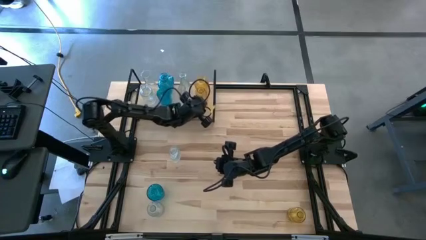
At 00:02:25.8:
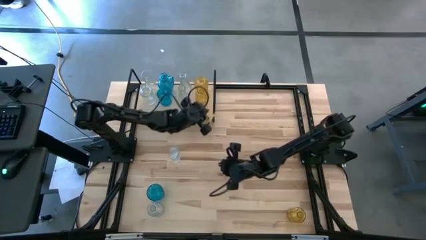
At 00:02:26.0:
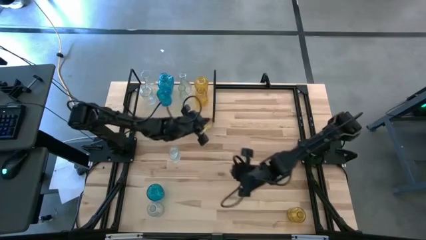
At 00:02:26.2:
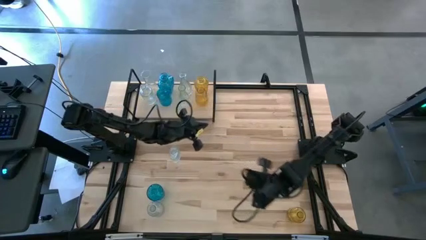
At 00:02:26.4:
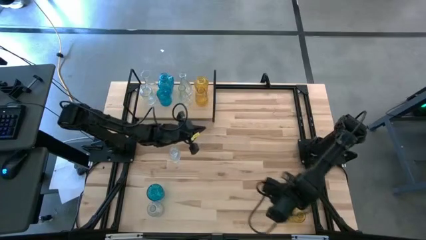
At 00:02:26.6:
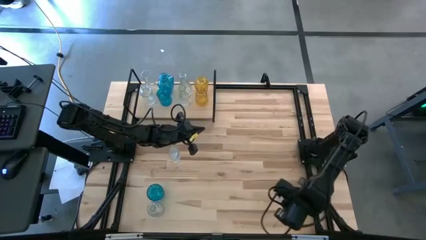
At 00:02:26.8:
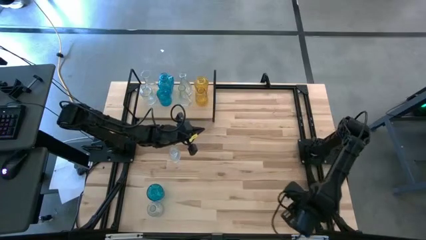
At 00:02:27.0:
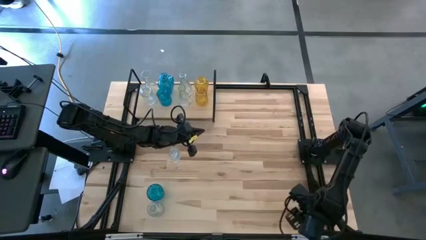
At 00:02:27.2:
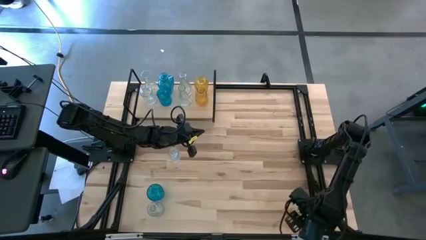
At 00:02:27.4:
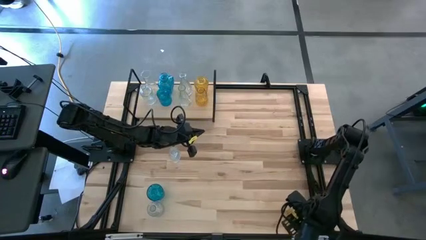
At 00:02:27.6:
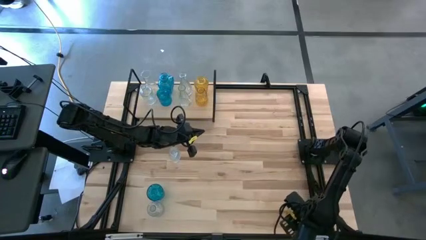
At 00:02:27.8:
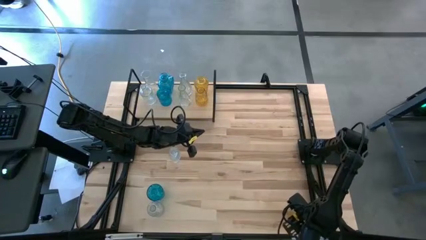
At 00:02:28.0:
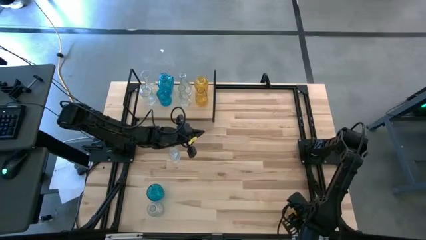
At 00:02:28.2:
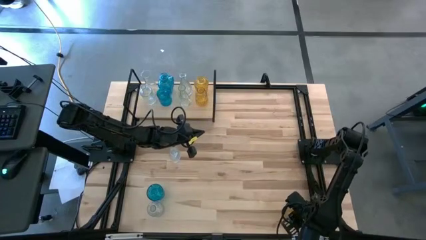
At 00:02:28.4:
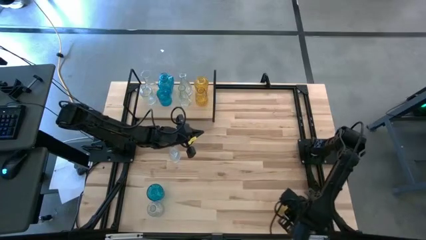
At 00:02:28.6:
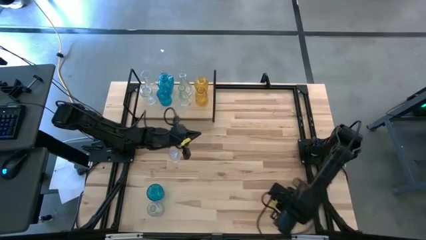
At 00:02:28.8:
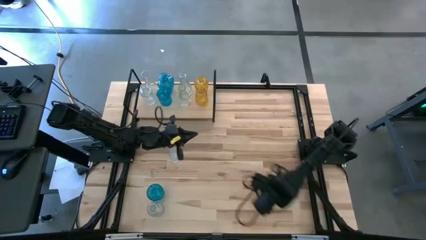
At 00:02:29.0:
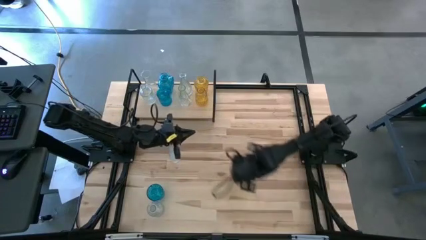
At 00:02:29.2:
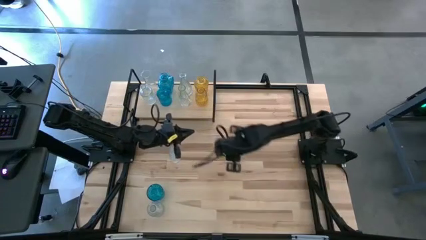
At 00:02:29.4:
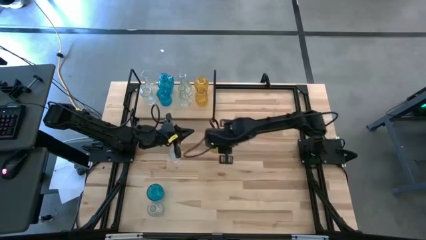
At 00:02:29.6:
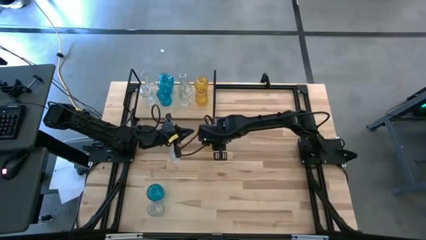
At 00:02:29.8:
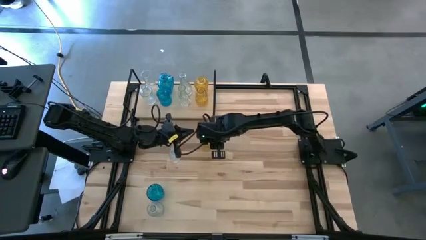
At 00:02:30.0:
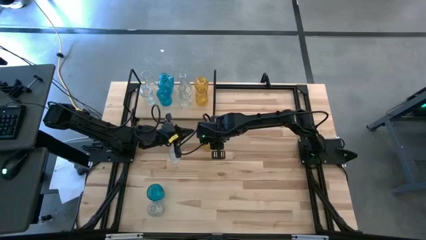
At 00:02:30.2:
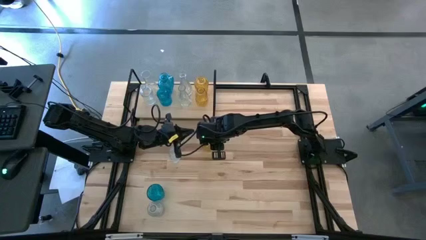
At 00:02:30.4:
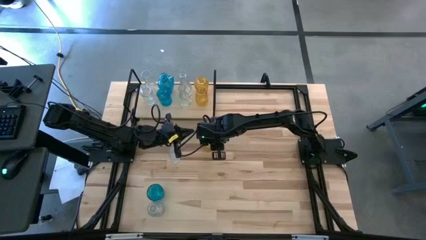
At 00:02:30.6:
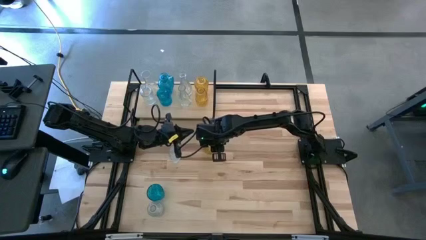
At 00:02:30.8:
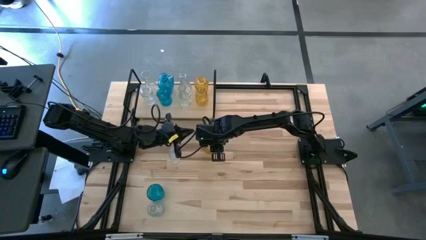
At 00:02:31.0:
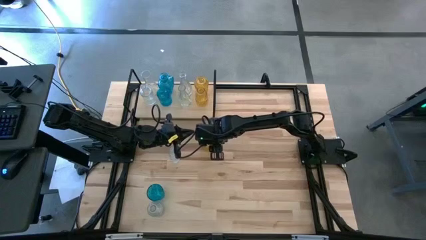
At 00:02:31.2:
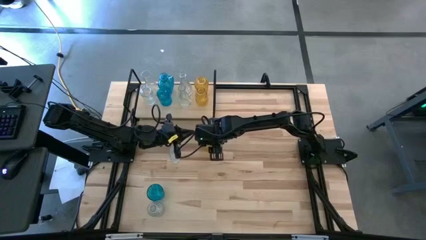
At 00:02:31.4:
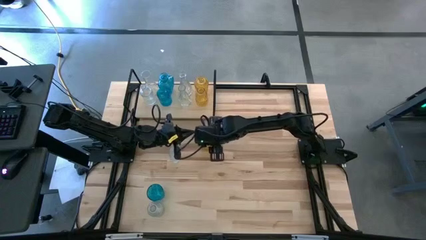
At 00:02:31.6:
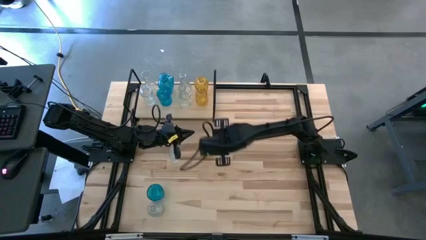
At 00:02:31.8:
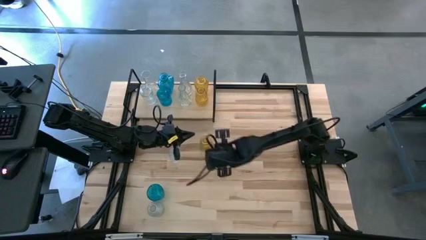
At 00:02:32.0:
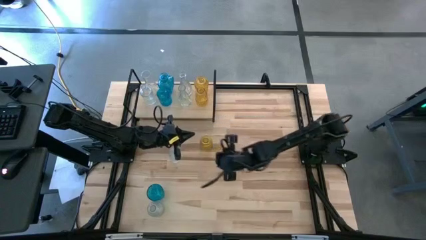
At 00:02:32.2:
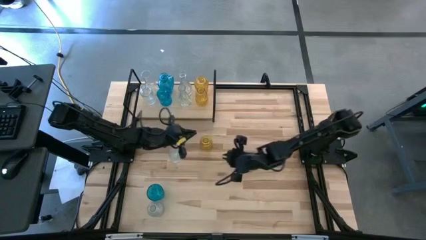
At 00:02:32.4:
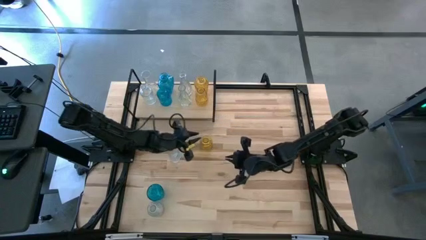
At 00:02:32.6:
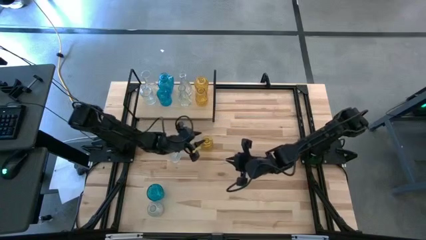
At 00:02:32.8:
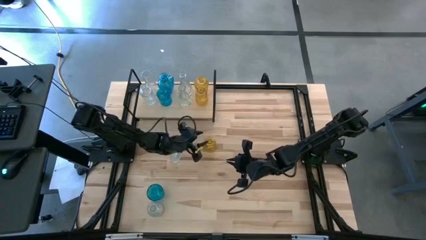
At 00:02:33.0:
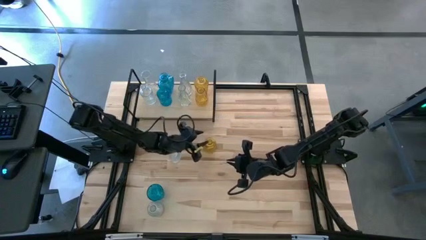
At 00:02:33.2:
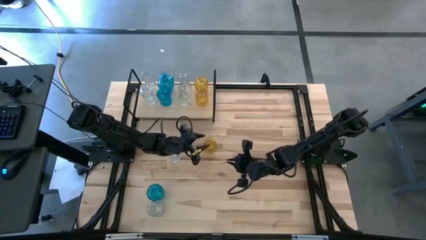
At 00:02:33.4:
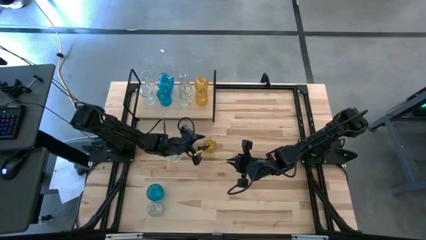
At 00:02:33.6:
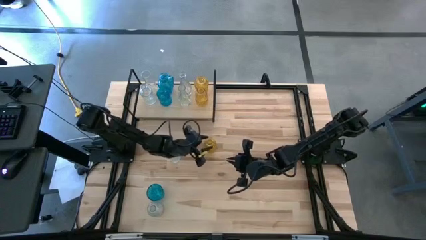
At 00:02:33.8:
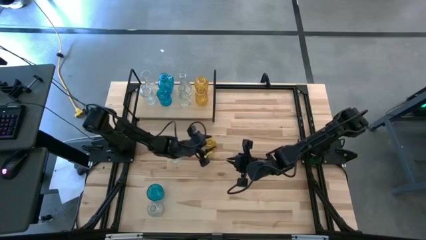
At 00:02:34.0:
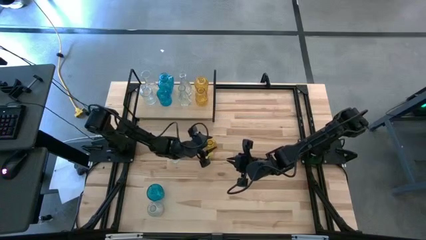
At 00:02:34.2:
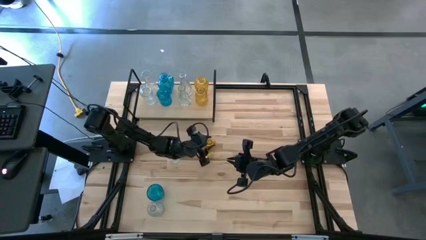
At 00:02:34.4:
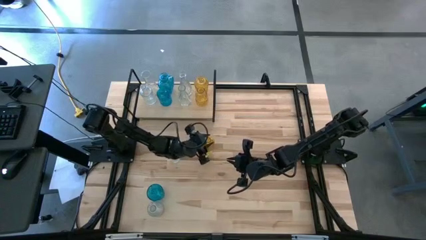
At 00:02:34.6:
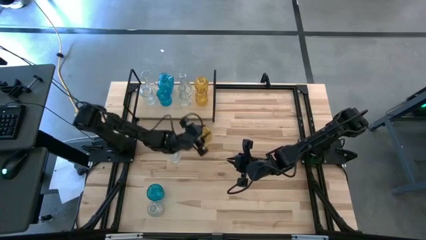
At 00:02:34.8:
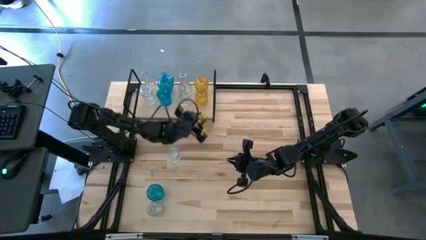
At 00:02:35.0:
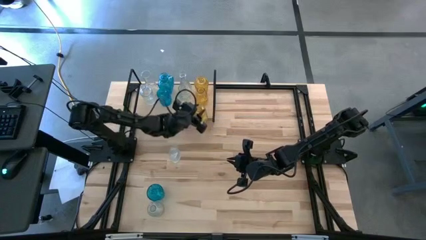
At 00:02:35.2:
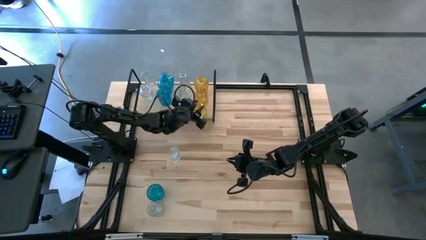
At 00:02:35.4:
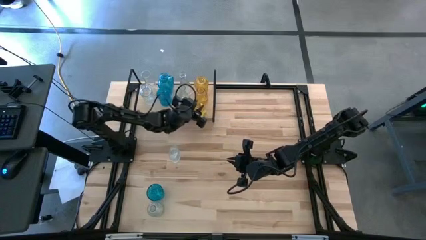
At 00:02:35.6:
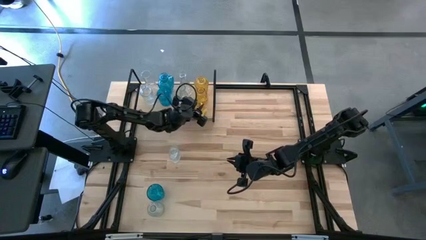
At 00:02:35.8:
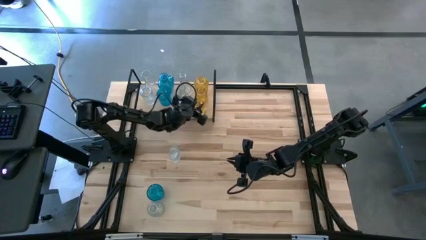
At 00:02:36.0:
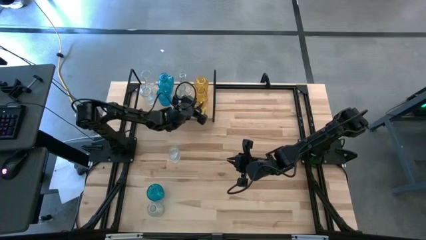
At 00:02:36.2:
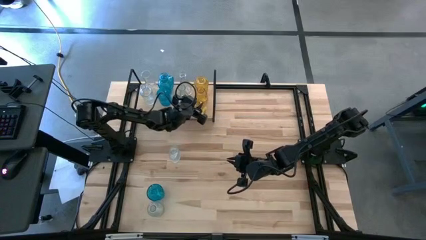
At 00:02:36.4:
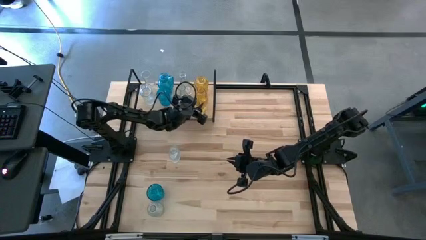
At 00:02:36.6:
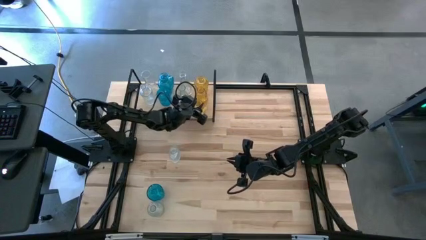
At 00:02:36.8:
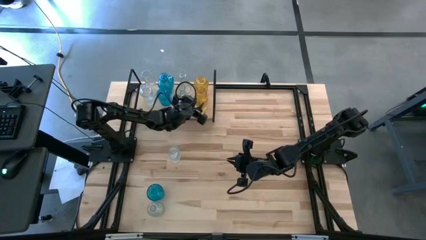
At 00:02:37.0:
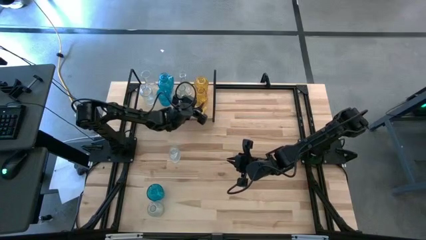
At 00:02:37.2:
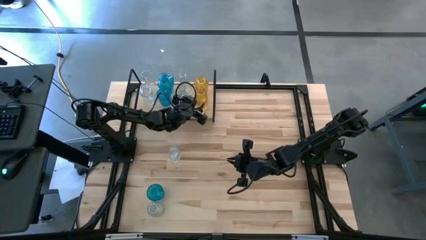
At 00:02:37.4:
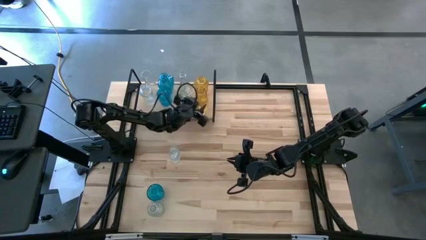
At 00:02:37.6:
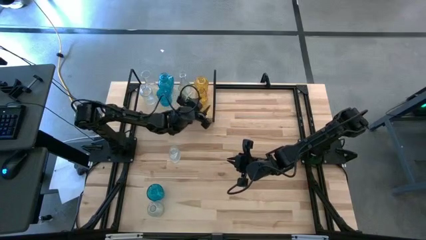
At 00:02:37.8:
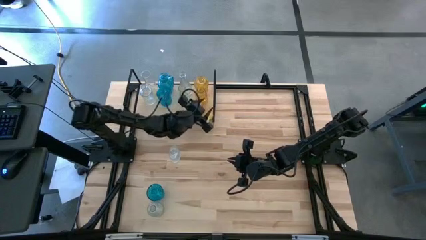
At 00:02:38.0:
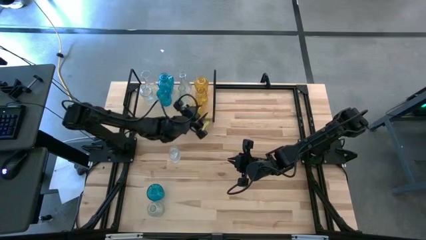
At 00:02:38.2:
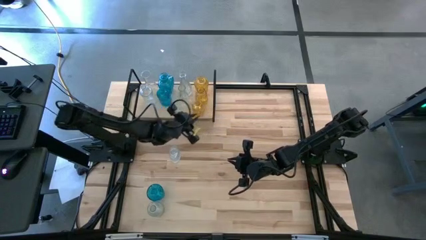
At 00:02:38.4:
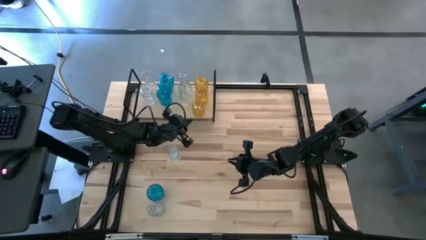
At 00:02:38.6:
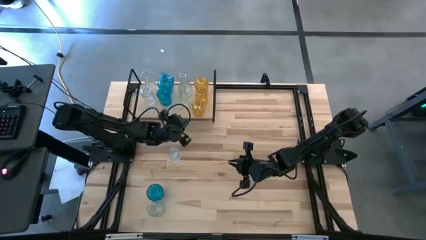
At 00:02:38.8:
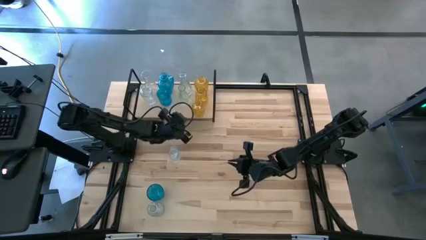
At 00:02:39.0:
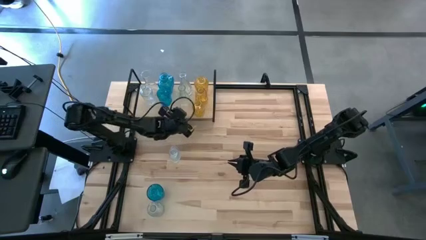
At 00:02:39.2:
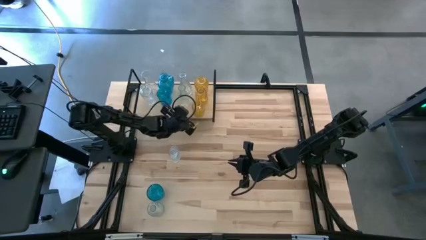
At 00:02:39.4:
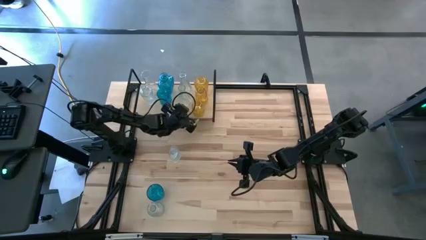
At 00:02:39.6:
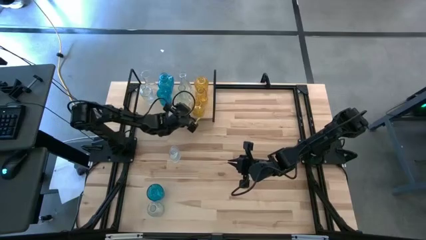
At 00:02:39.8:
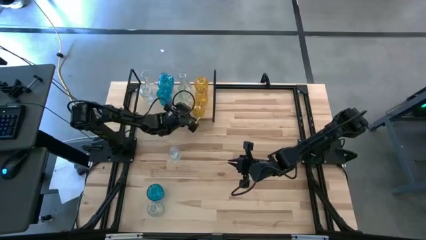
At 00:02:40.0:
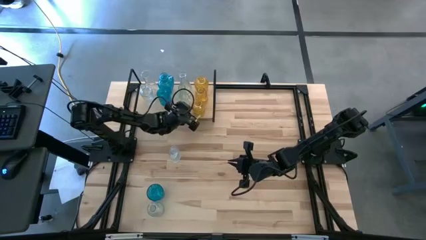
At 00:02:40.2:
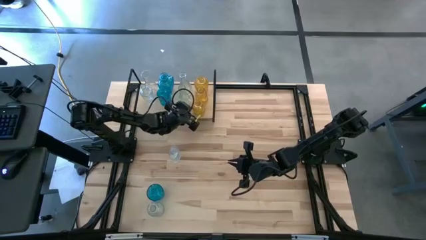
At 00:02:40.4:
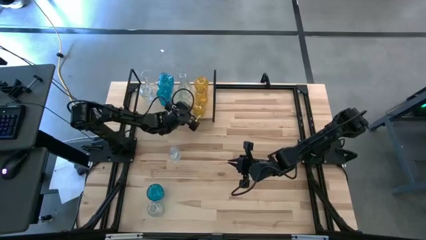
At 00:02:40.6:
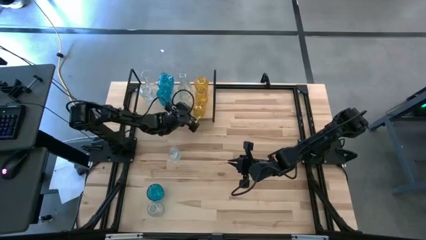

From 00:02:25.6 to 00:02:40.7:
Task: sort vases onto shelf
Put the yellow vase on the shelf aligned with the other yellow vase

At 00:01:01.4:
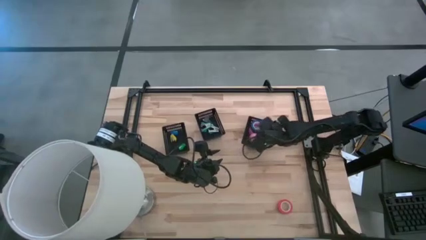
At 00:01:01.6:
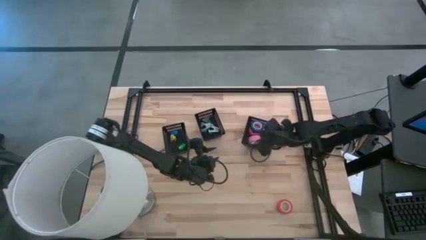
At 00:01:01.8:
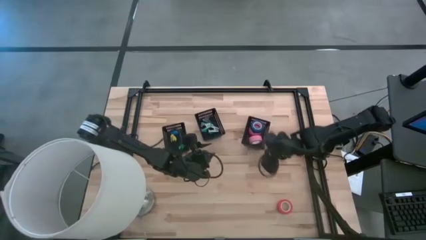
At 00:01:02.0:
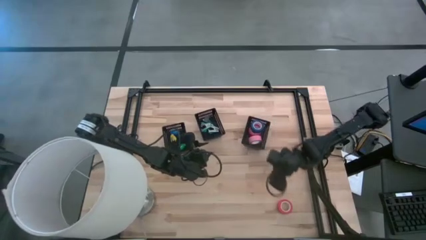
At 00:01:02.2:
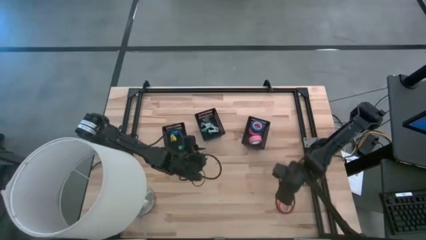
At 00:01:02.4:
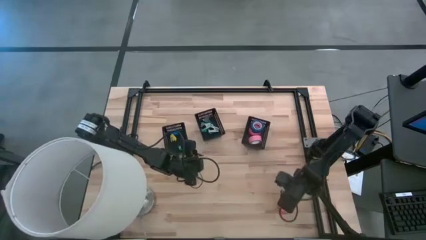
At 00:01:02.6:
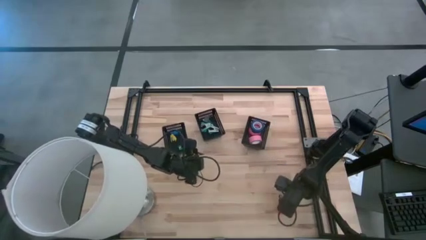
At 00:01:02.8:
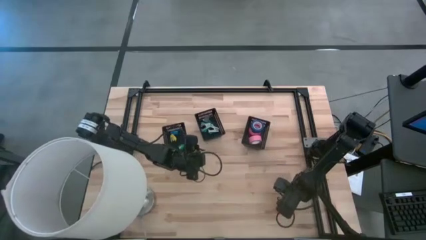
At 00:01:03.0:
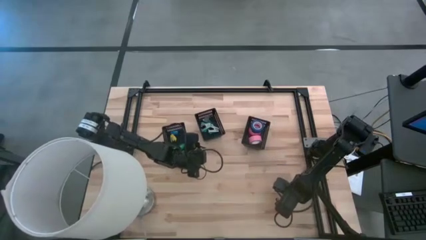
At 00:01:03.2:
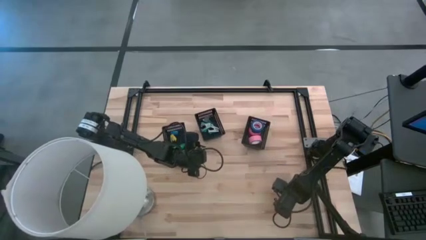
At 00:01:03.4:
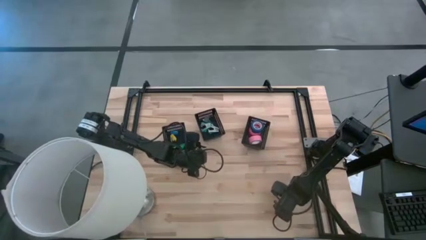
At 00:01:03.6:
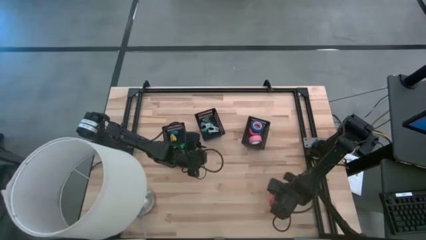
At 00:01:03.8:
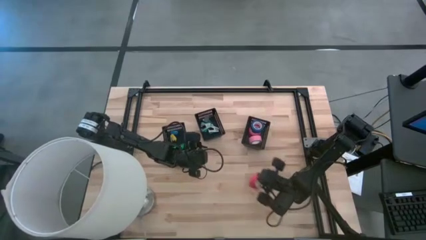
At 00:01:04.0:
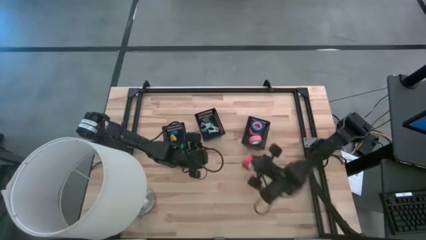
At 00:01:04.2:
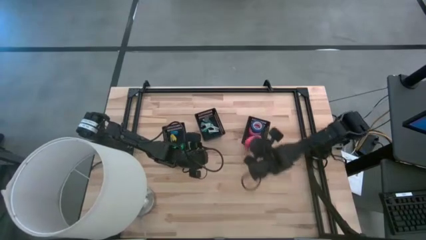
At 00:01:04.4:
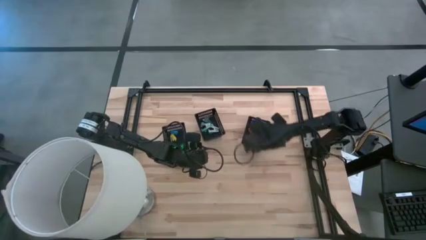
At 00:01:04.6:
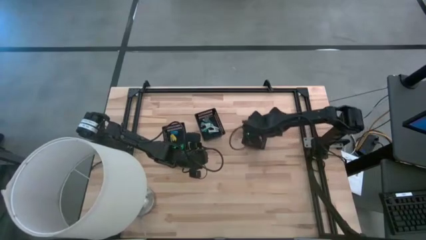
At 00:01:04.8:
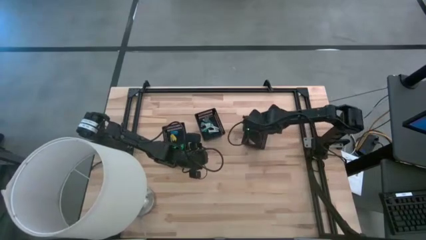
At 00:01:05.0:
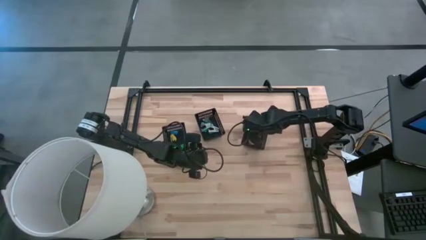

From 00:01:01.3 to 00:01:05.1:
Task: Pick and place Stapler, Stapler remover, tape
Put the red tape into the right black bin
